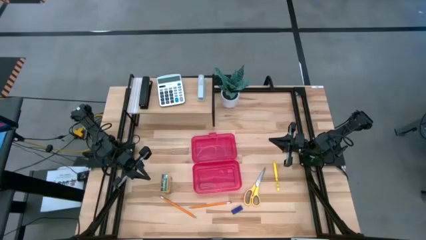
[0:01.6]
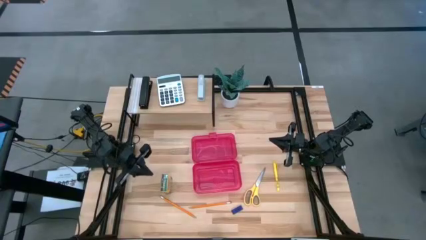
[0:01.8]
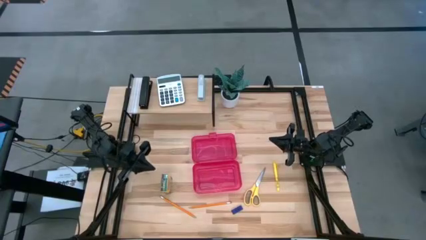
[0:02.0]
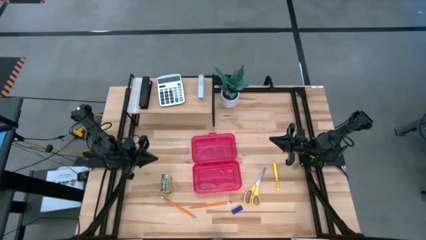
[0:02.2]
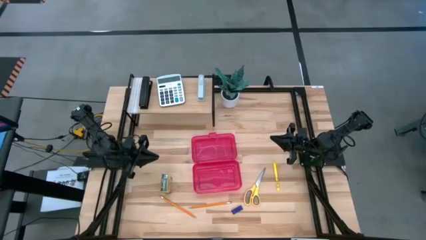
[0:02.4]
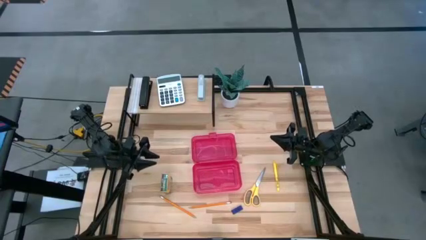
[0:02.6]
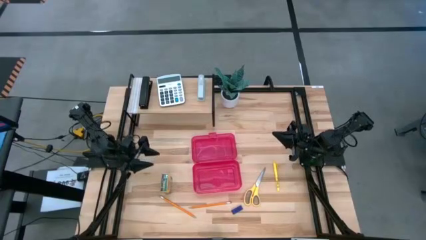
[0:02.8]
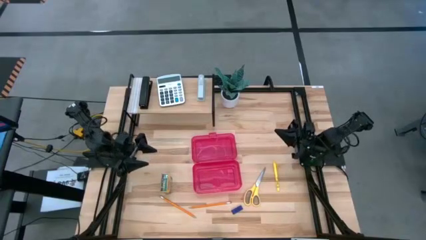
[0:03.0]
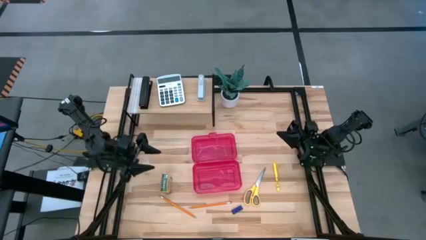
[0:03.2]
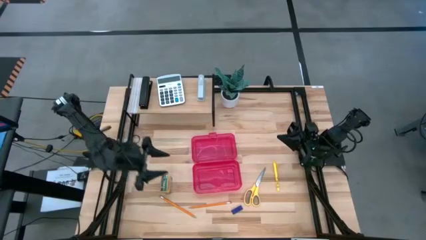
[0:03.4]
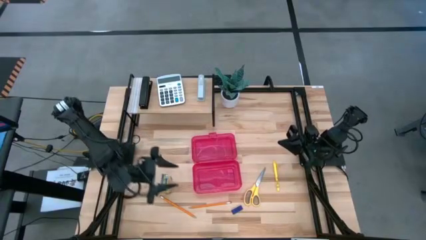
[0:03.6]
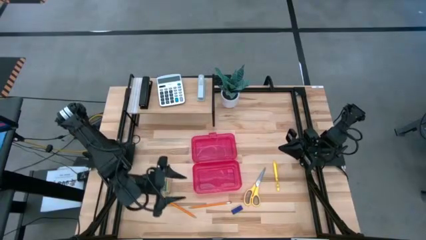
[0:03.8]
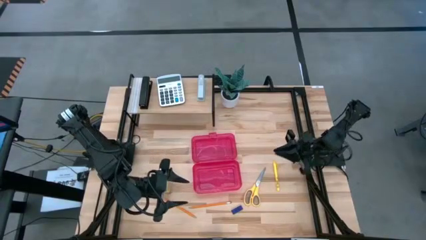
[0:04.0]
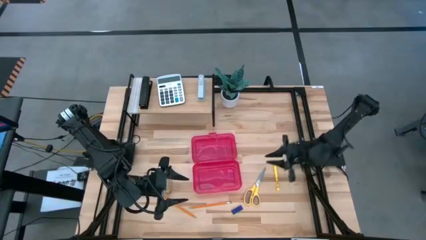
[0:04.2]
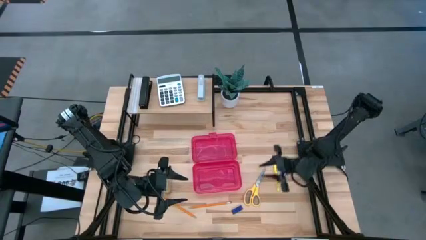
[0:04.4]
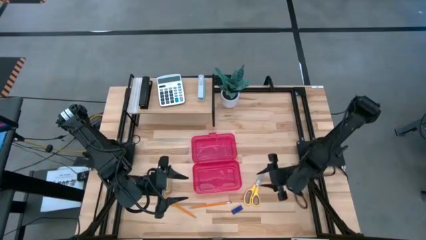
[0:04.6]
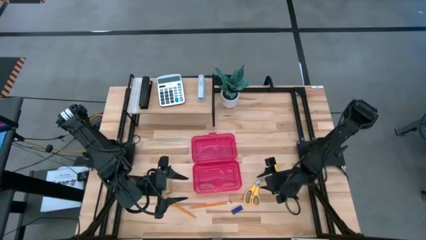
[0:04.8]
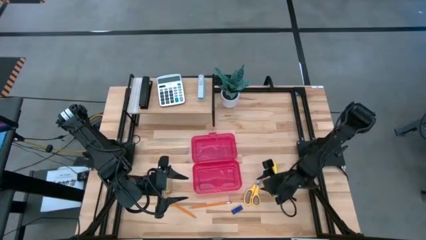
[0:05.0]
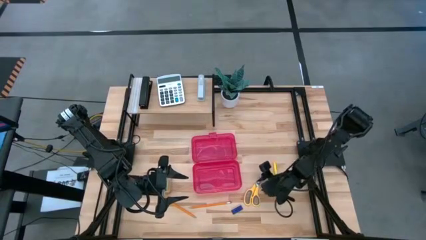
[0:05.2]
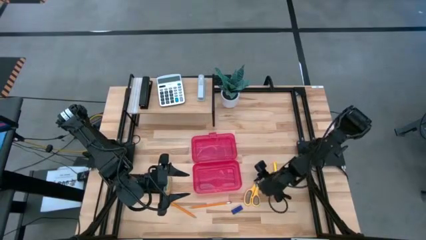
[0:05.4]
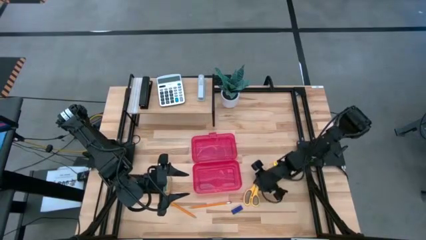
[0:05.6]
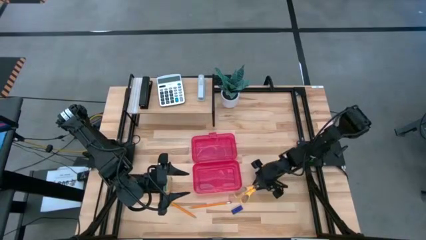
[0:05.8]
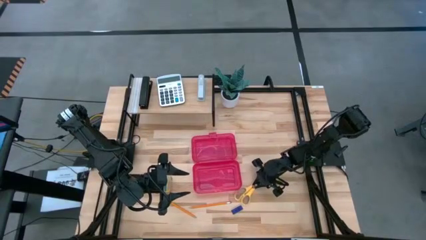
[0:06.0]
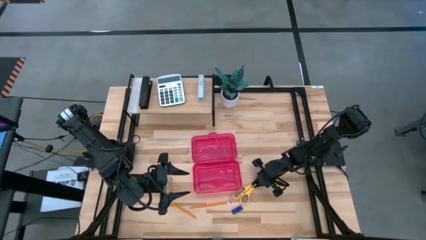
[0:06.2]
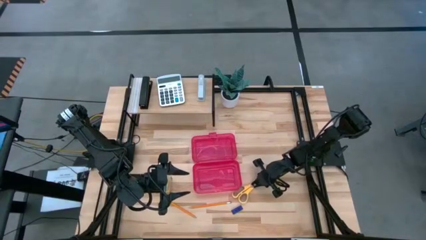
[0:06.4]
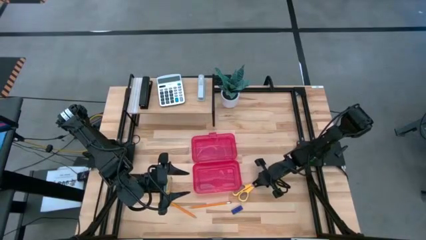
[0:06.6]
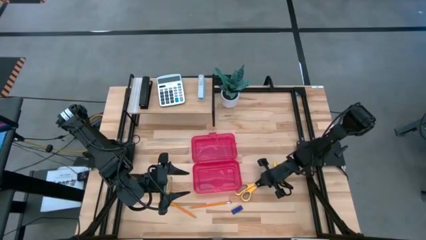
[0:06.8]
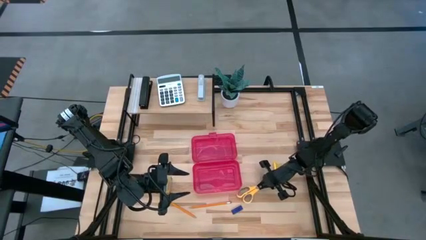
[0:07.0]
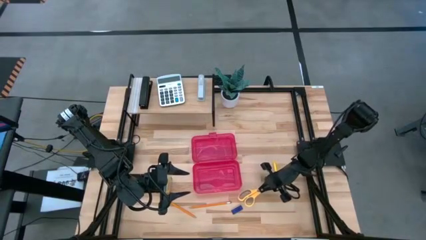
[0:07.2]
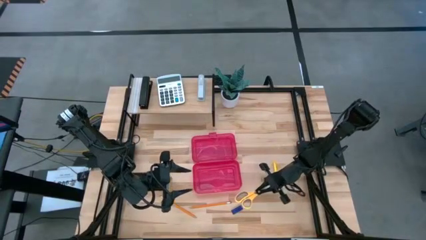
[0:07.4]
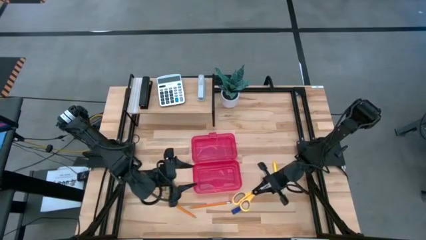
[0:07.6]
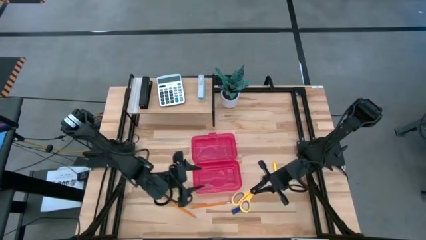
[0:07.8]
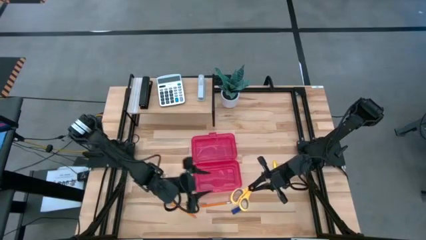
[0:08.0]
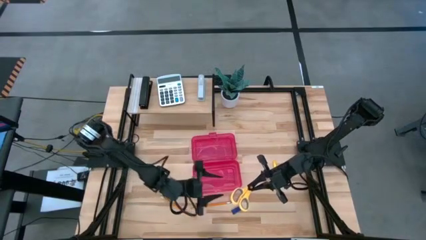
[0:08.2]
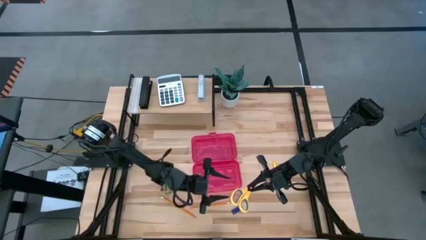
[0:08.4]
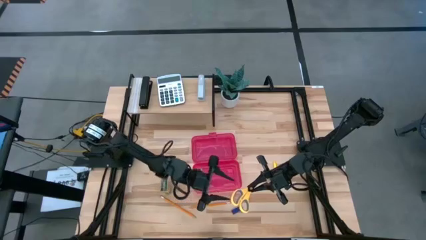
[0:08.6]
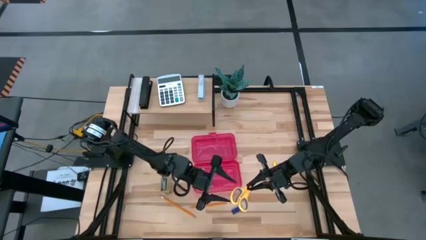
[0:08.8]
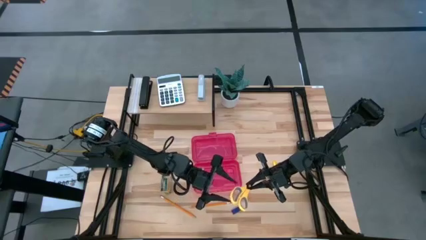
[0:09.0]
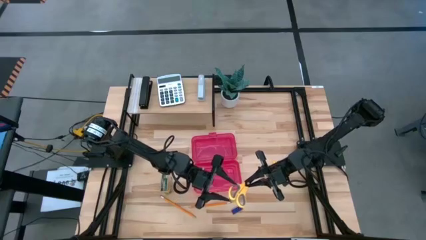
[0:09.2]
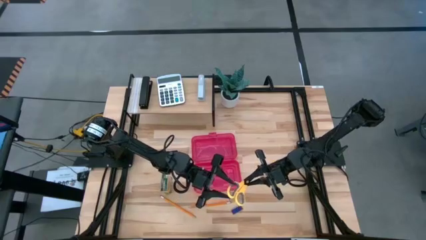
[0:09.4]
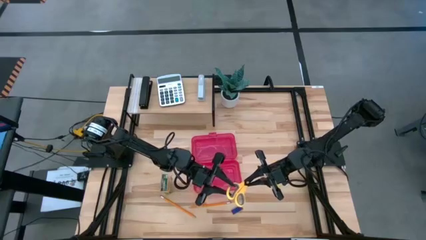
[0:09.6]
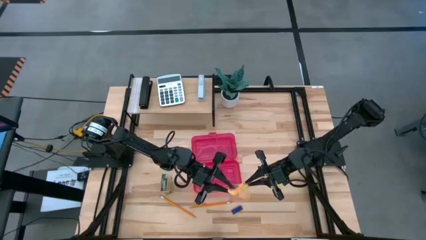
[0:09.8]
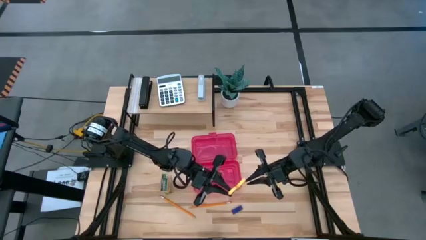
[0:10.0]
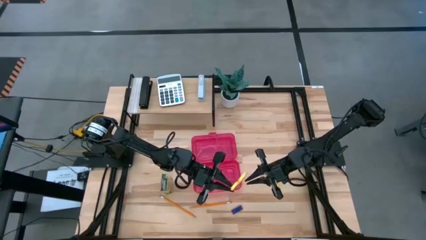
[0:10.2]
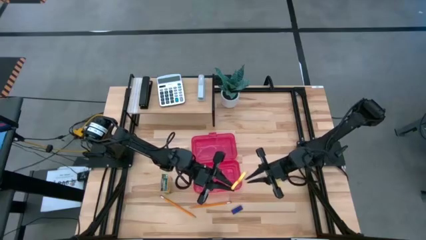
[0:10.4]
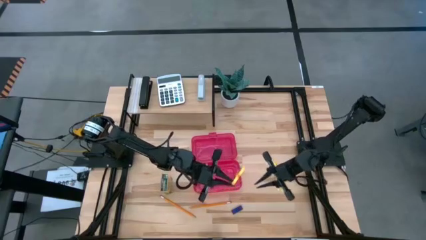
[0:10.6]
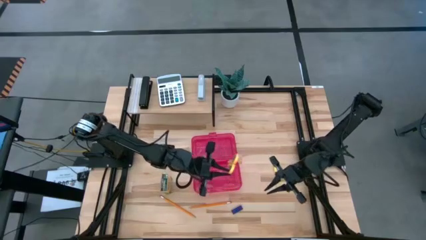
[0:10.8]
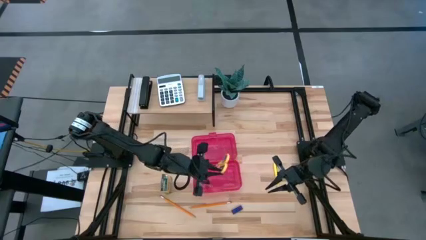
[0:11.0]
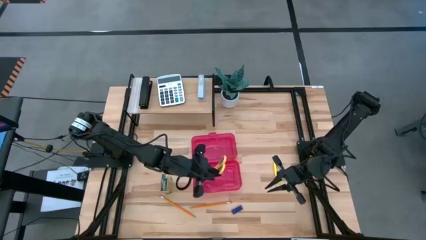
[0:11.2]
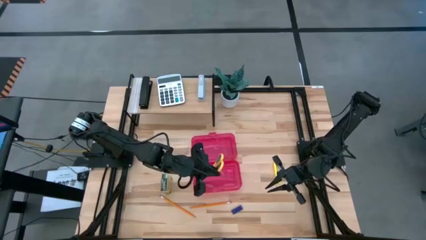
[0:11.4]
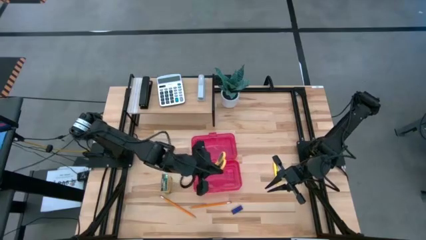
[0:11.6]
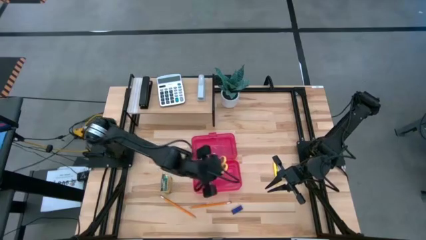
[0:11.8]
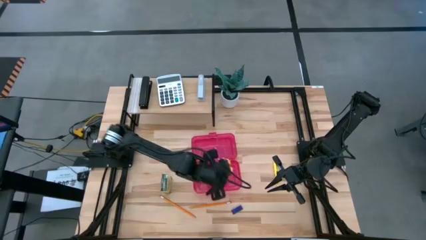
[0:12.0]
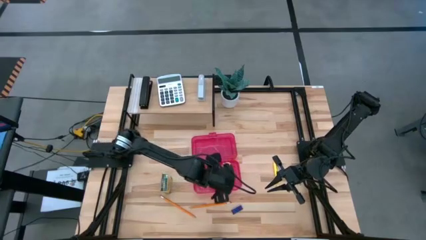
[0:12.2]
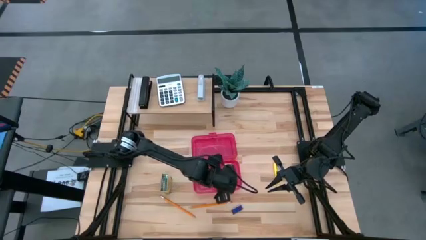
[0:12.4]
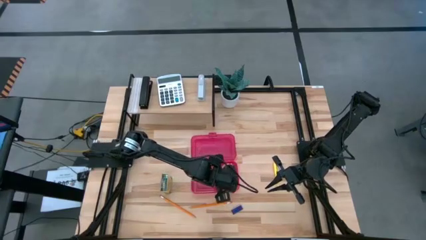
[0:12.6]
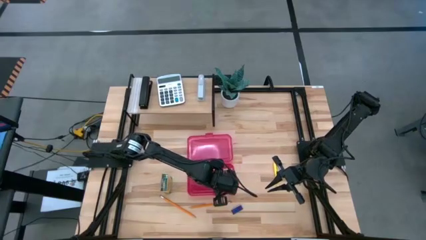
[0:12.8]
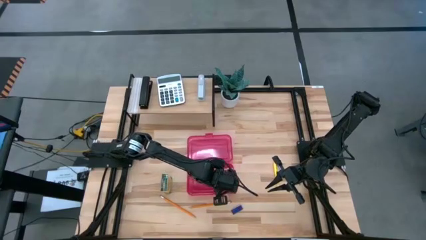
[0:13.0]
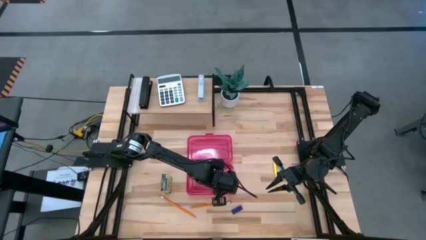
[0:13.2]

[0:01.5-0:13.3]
Task: Pack school essentials
Put the yellow scissors into the red supply box

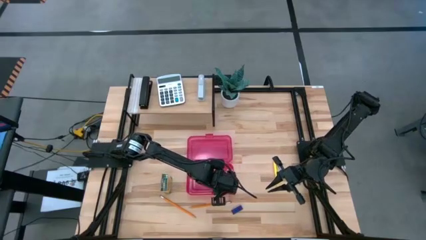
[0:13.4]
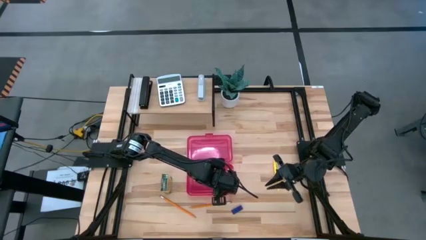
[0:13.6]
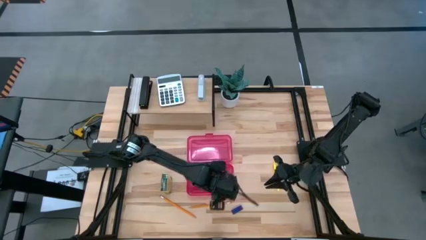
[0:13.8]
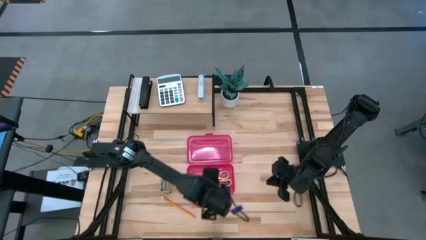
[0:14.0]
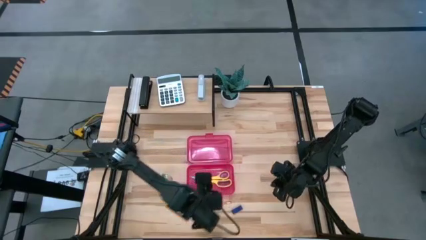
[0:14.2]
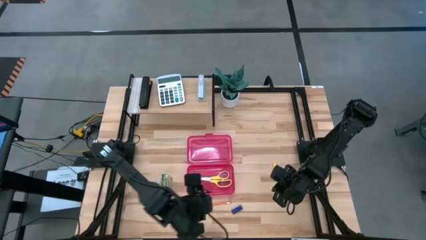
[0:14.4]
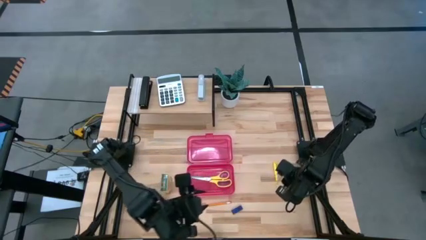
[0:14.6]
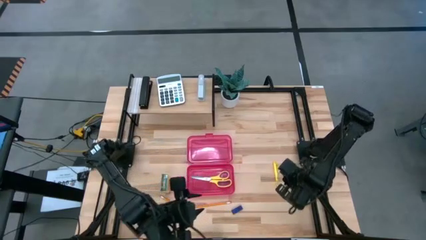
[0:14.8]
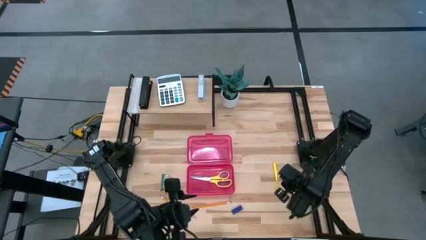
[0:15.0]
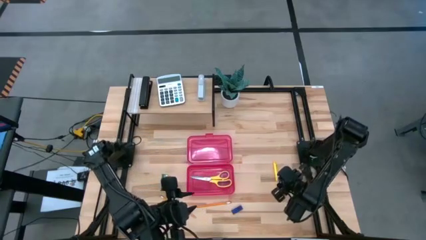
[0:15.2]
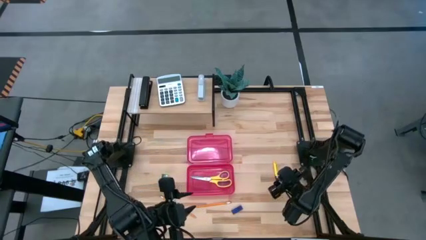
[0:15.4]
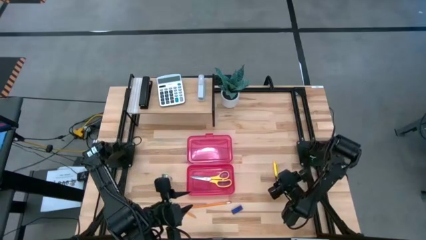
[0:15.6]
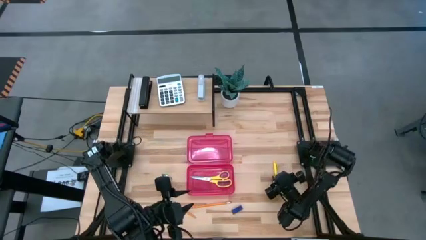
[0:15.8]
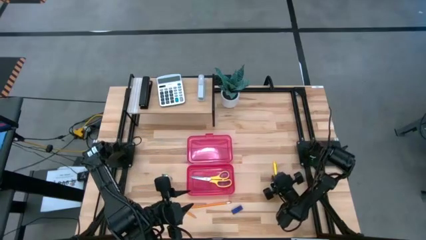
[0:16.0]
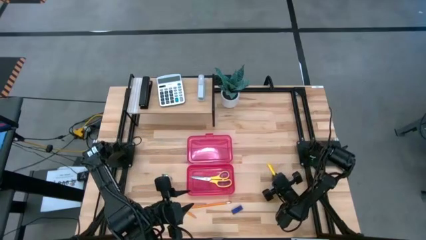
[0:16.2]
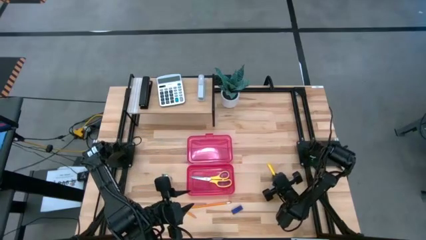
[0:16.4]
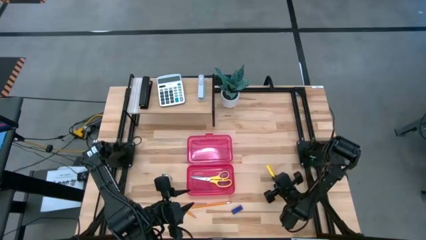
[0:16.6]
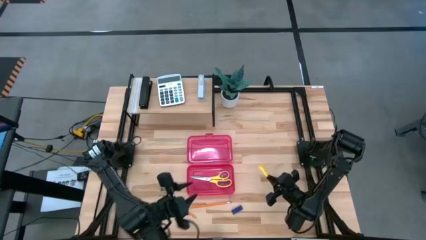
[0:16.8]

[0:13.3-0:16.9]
Put the yellow pen into the red supply box
